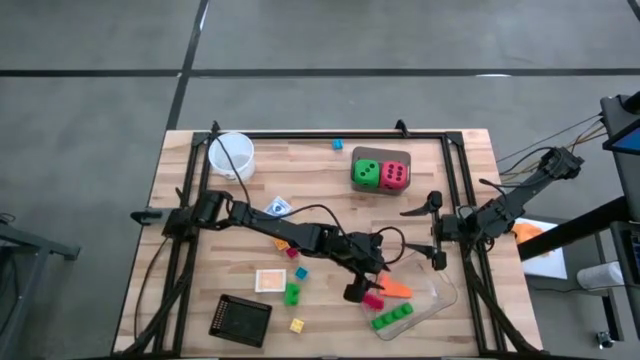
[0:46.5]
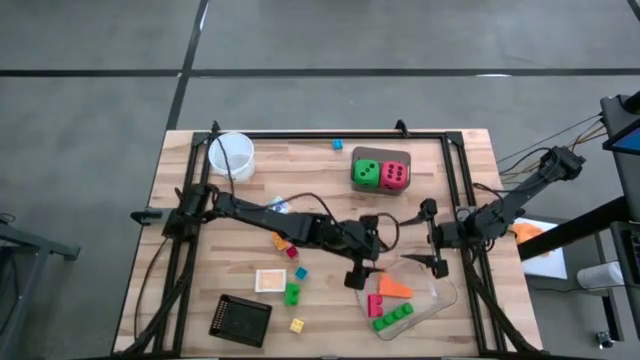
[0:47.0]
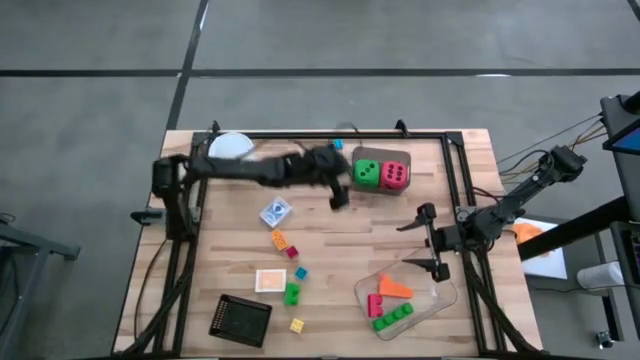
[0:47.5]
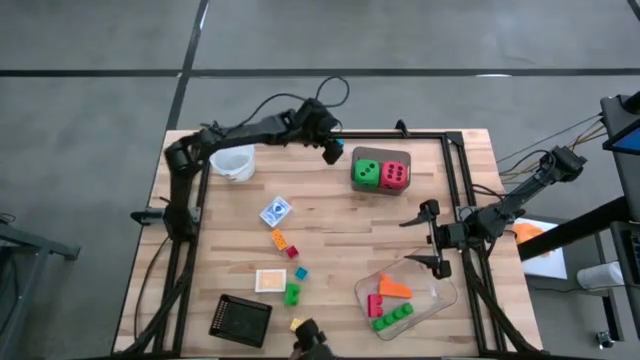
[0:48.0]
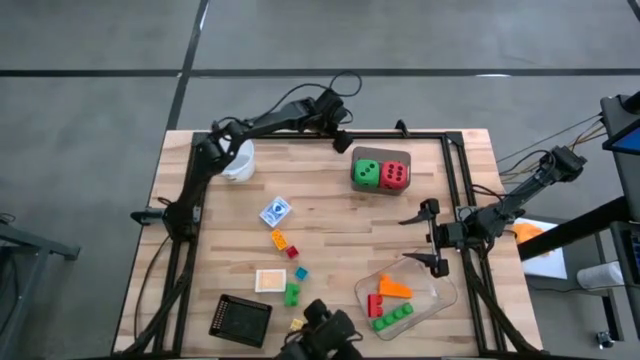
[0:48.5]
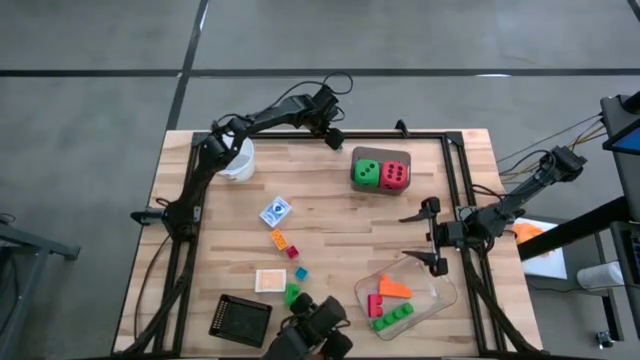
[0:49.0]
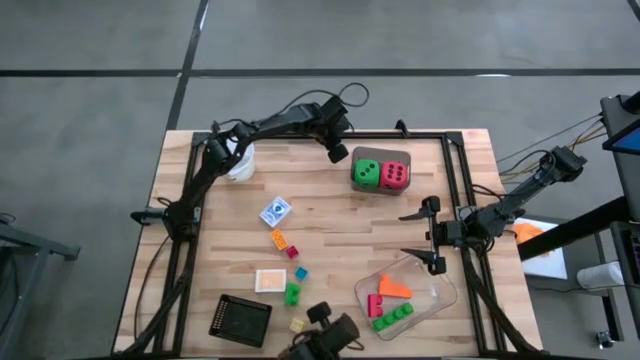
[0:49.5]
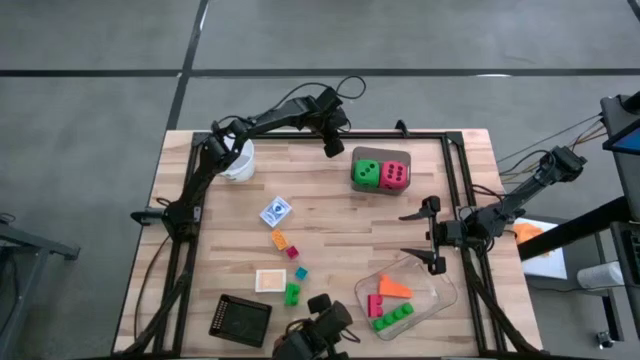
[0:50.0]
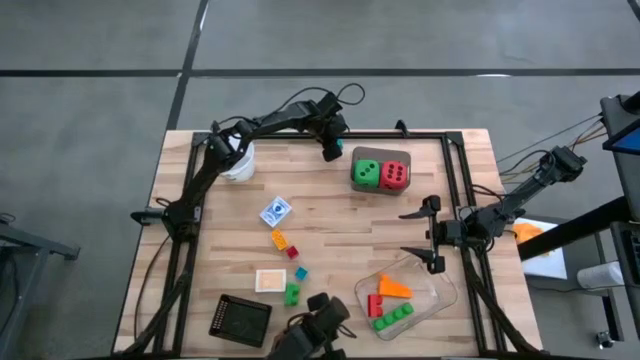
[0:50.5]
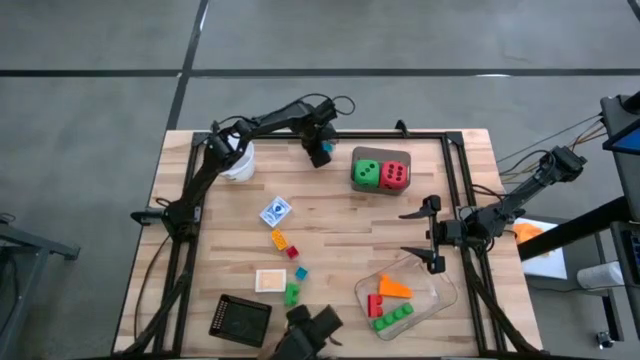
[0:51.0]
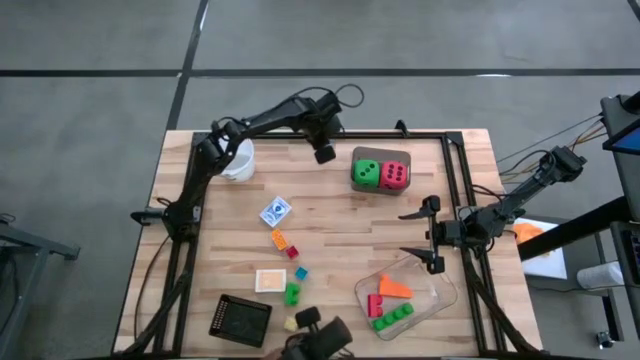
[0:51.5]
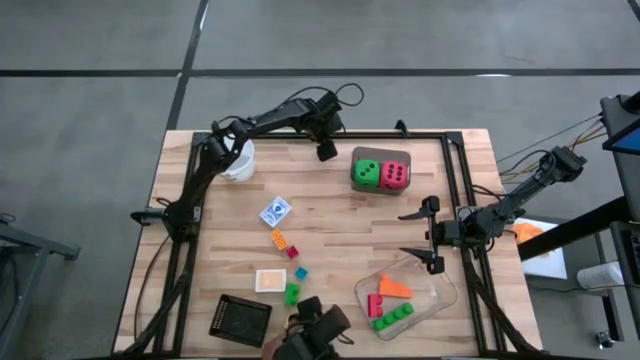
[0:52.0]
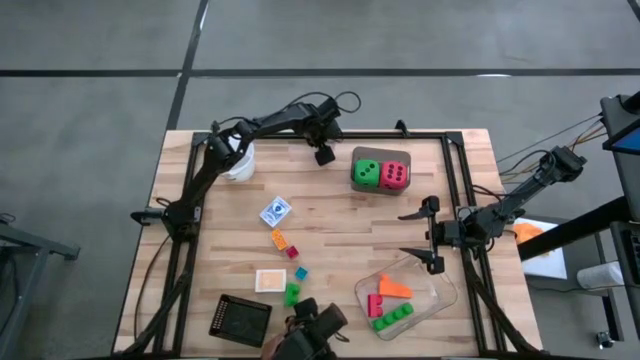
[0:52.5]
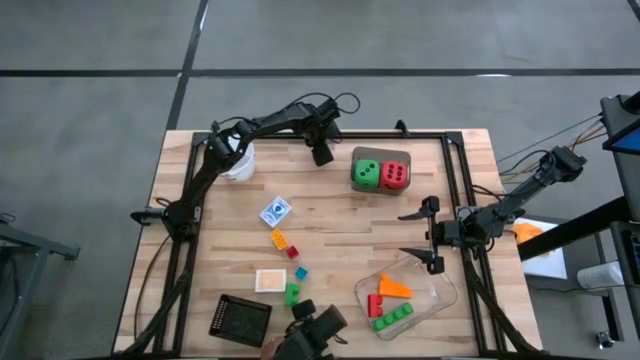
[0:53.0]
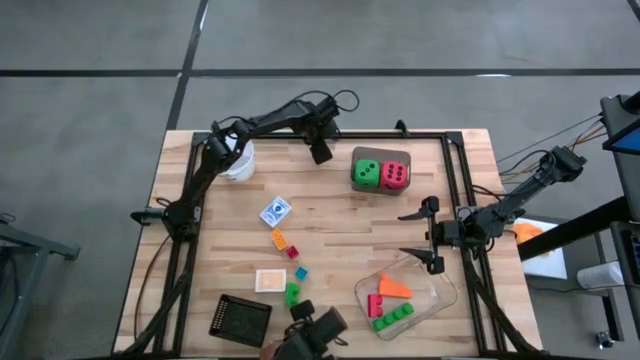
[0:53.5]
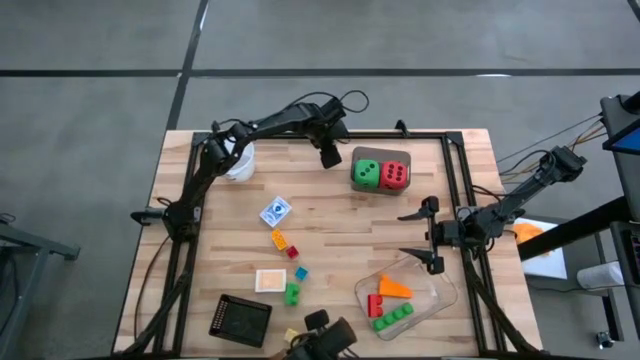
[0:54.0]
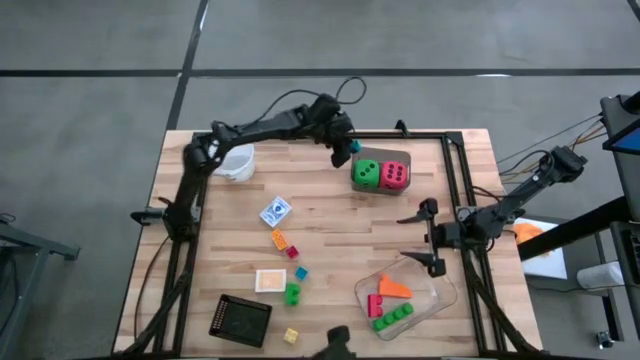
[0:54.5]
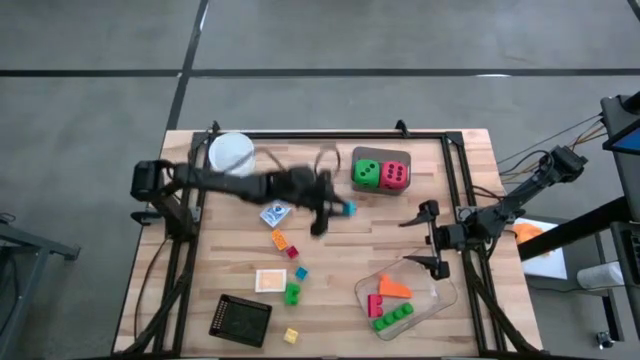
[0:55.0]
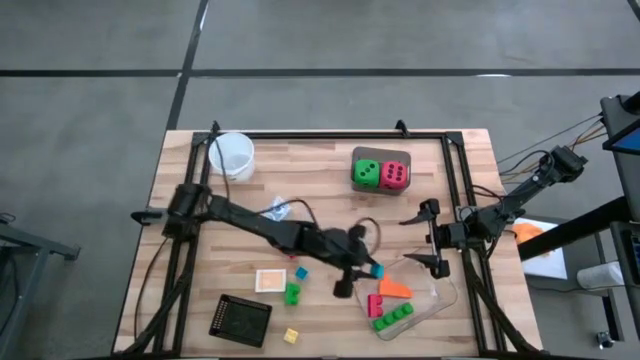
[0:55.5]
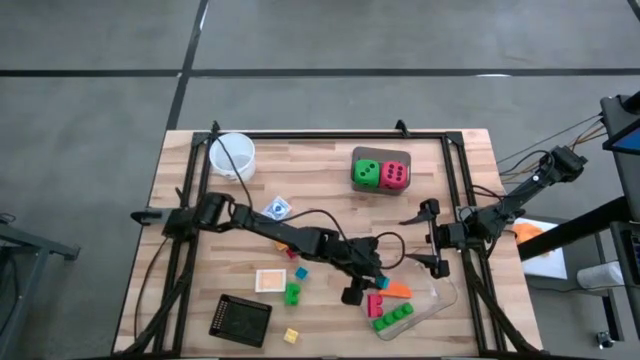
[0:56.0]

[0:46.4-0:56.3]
Task: Pick & Place Toys
Put the blue game piece into the transparent bin

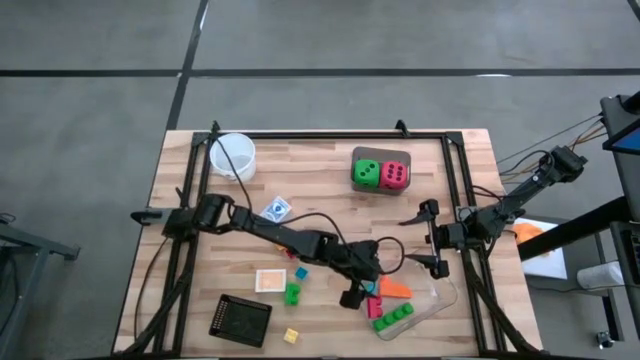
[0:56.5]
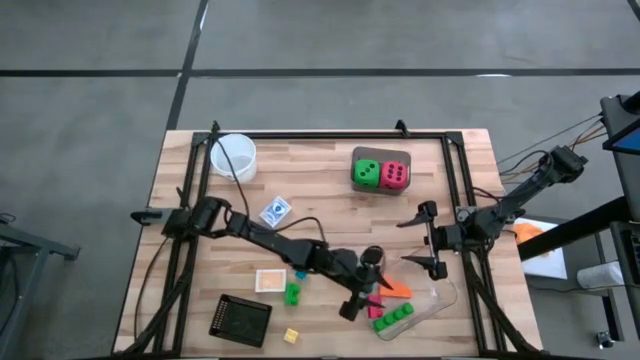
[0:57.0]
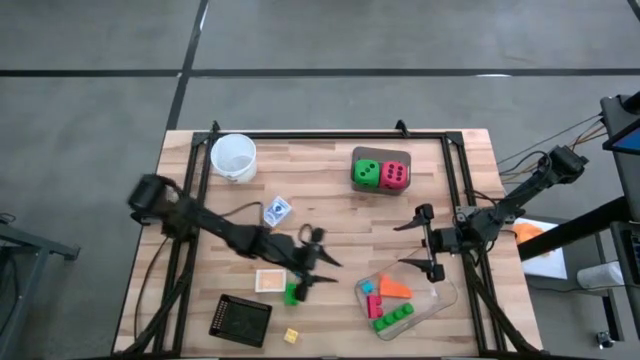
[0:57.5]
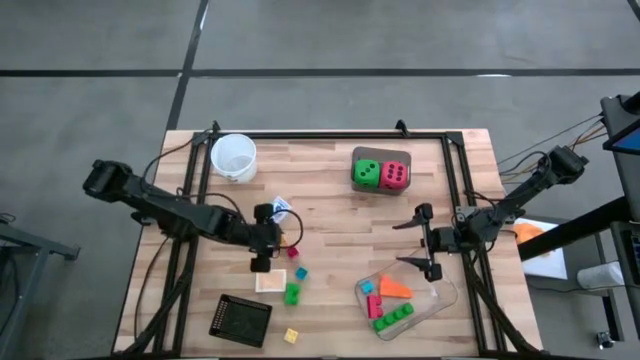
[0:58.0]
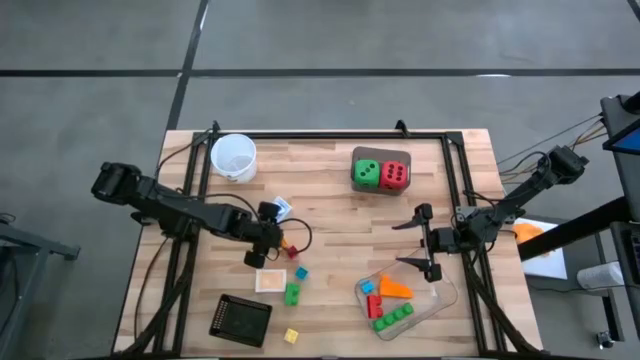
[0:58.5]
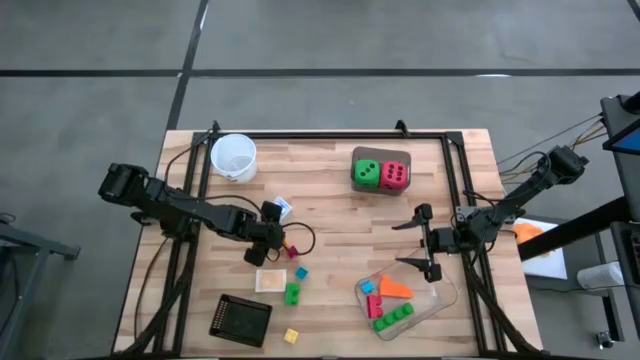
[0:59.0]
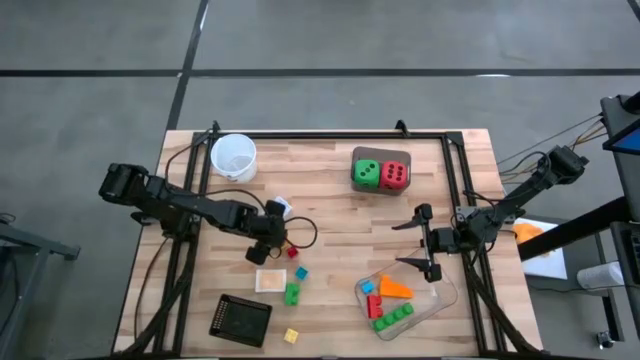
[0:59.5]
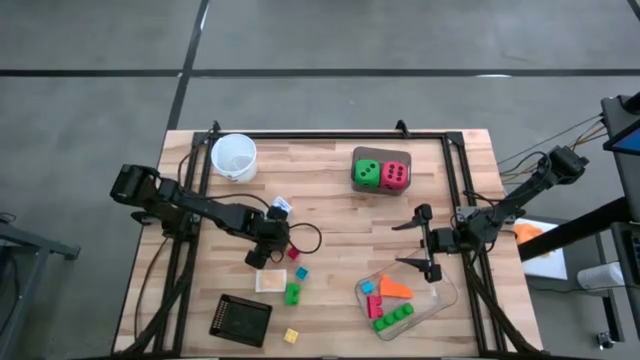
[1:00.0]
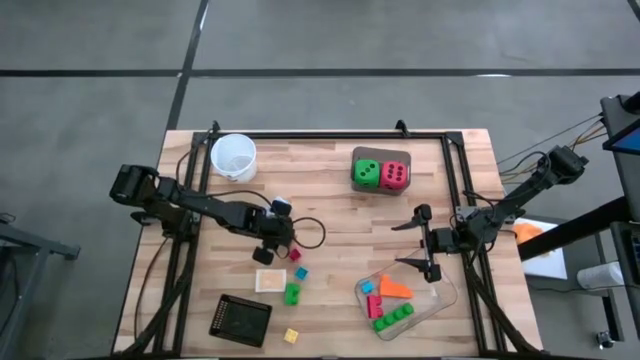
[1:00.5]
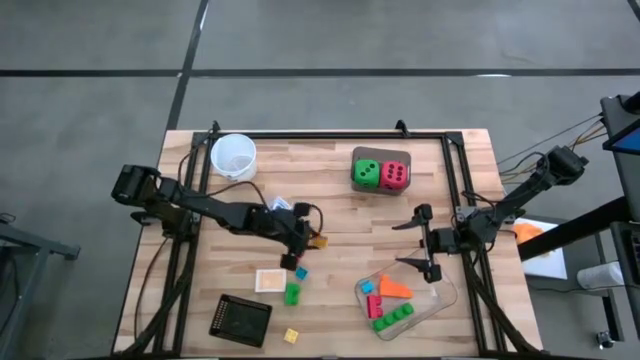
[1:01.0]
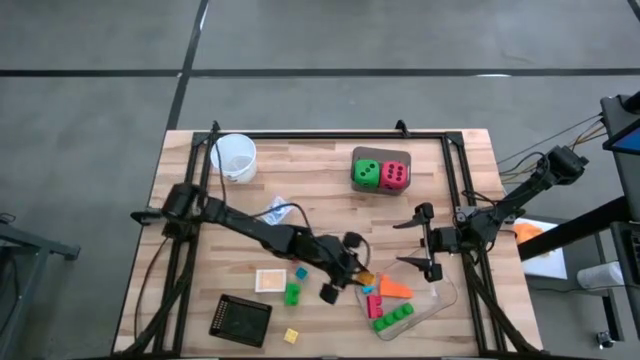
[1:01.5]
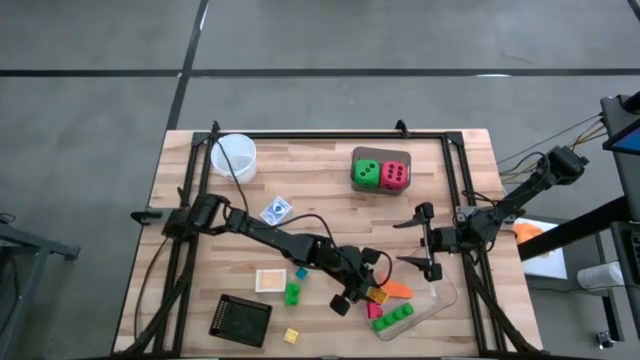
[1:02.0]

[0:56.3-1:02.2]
Put the yellow game piece into the transparent bin

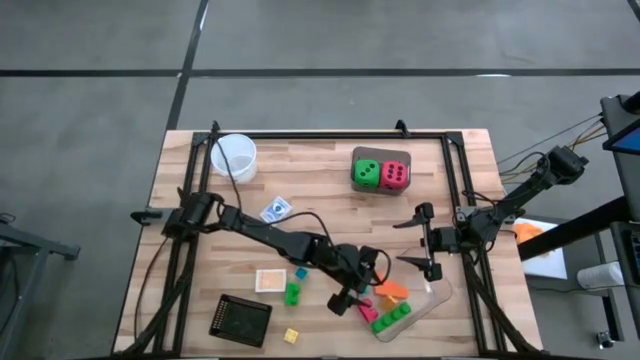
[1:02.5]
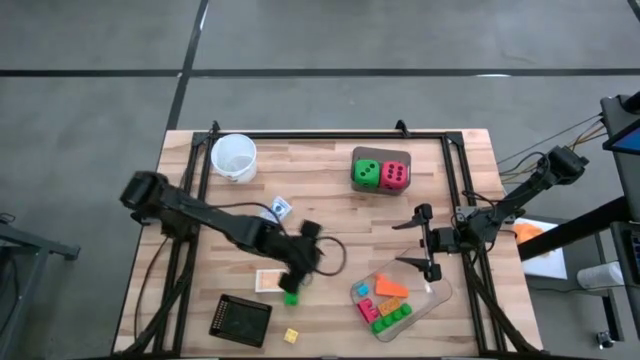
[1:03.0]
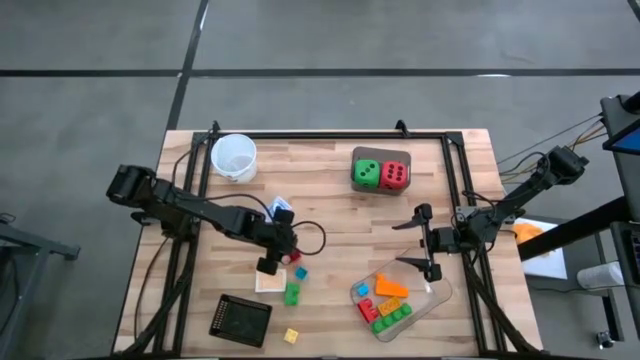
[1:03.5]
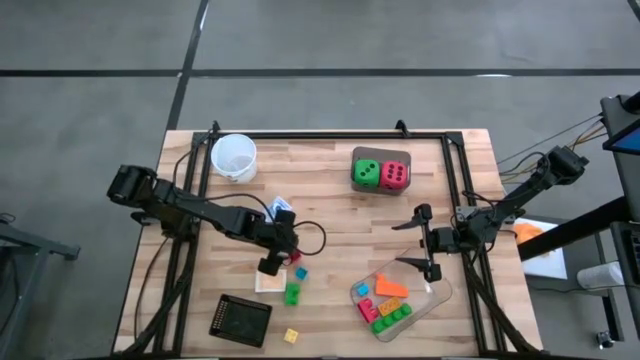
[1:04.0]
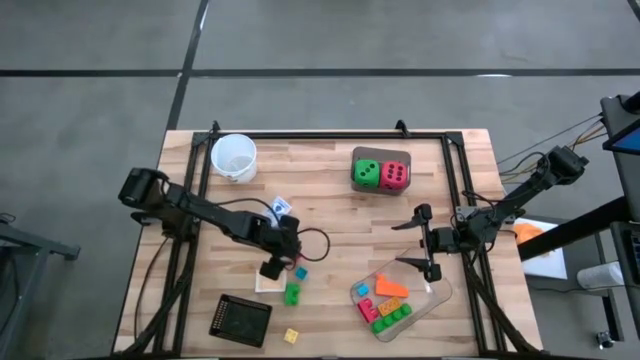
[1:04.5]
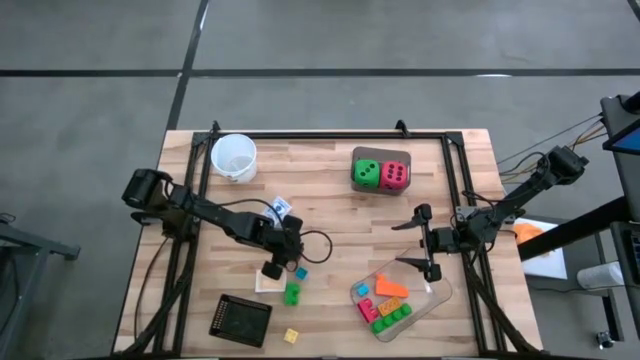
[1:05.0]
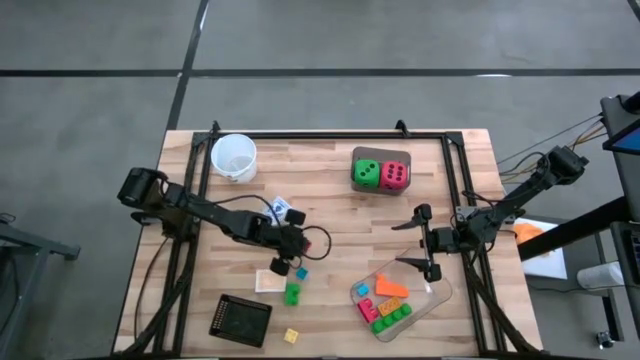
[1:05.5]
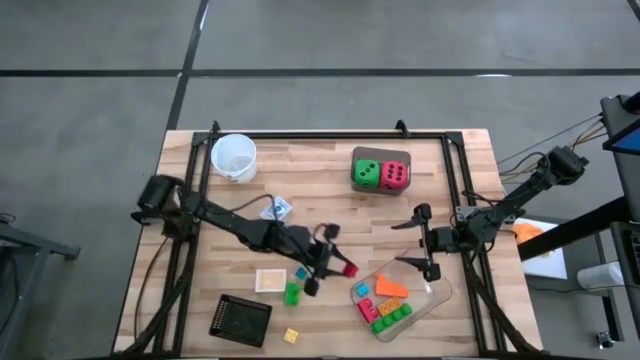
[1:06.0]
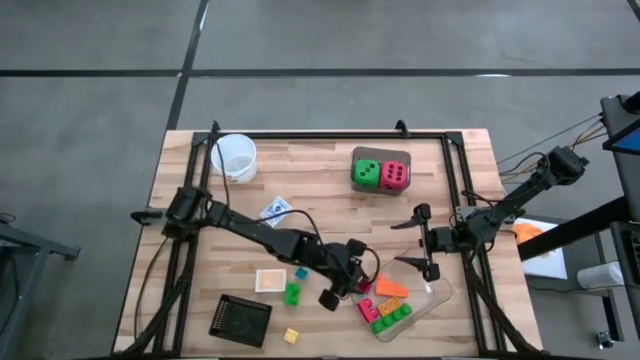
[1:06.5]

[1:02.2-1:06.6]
Put the red game piece into the transparent bin

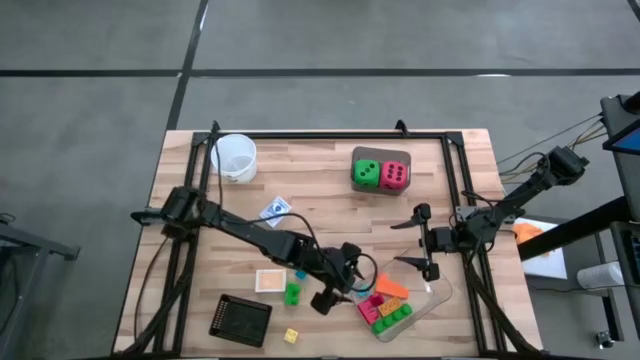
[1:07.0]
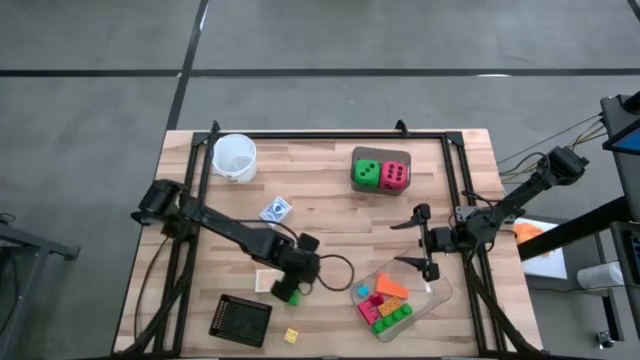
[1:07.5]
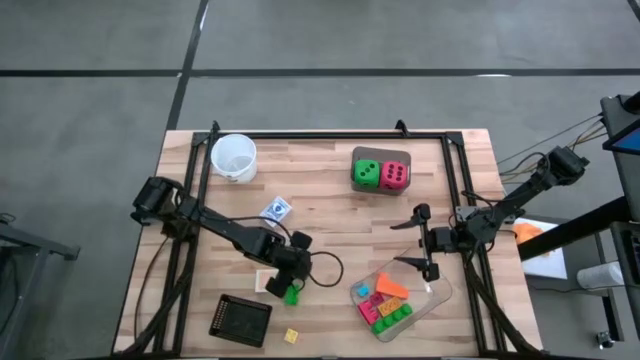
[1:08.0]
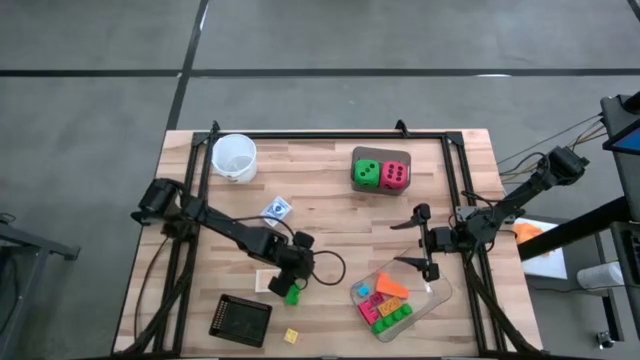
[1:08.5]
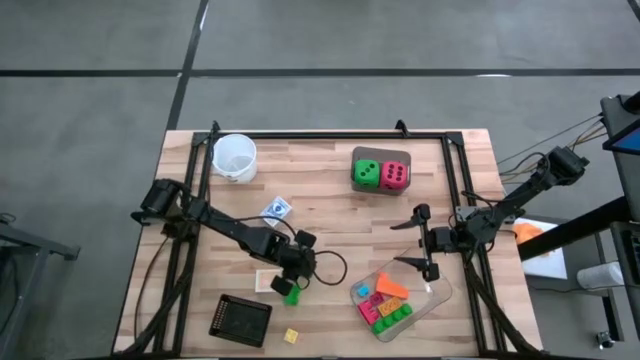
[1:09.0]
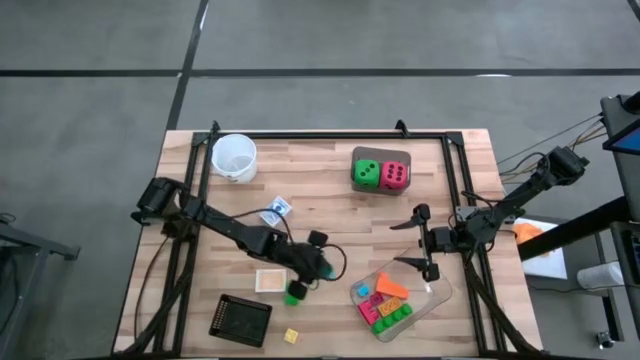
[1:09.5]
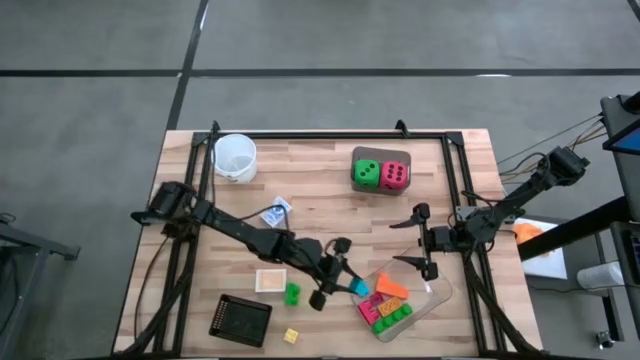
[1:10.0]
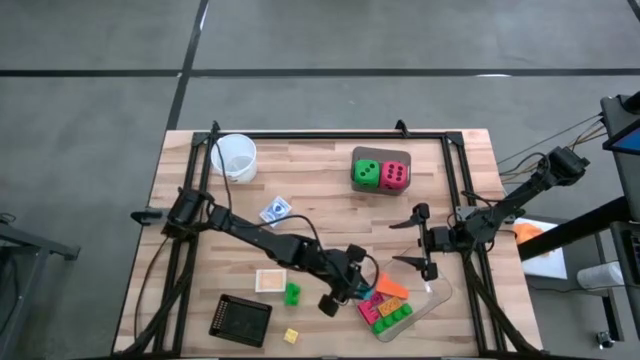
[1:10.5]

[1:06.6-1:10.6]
Put the blue game piece into the transparent bin
